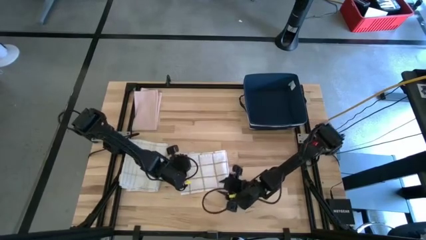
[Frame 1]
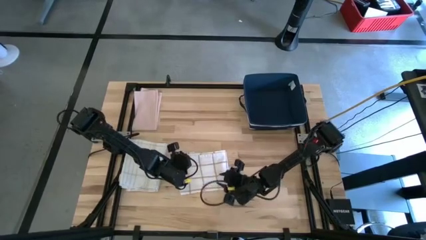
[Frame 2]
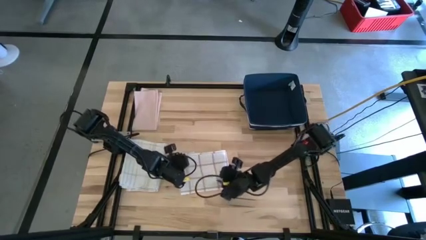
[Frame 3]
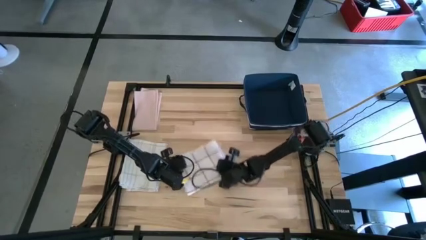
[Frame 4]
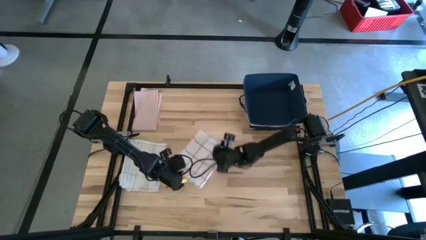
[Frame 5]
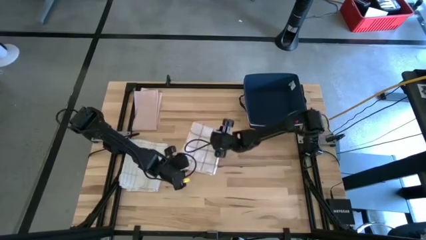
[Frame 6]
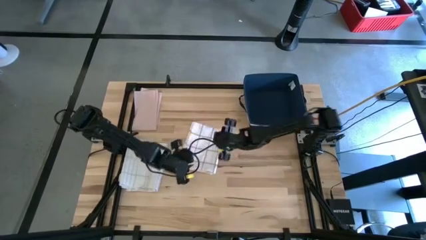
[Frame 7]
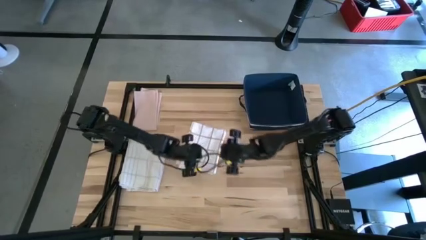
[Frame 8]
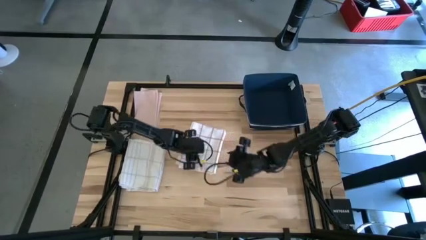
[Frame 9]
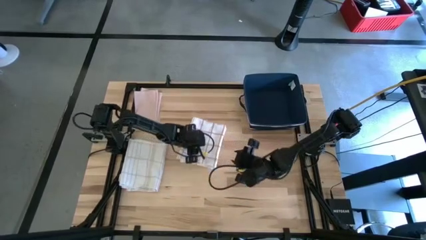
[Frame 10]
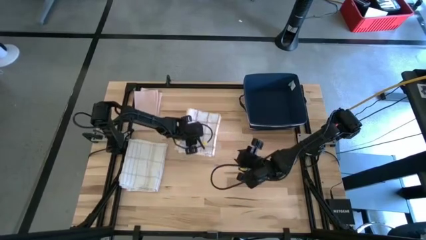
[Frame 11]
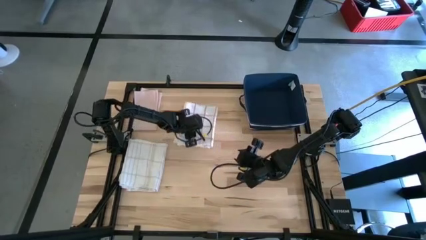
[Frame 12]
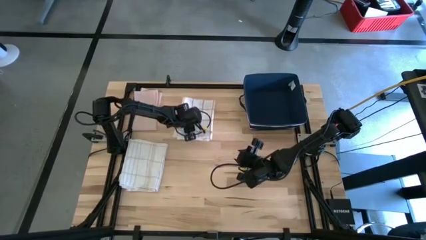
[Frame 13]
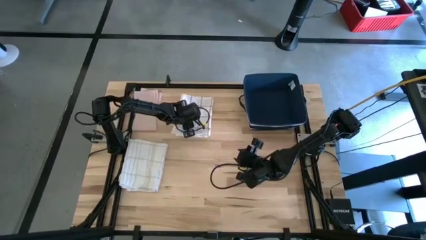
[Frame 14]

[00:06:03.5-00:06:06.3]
Task: Fold towel
Move the white squared towel to the top

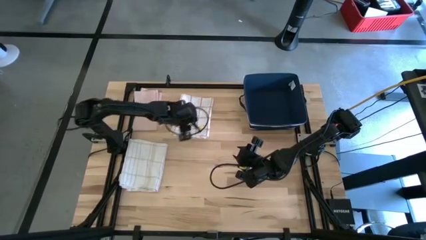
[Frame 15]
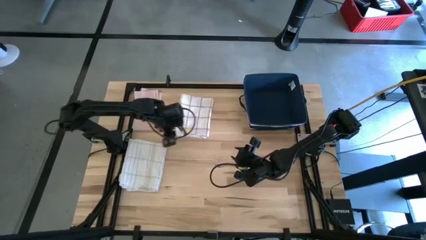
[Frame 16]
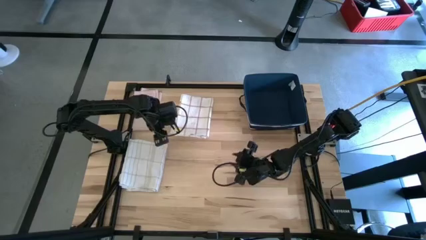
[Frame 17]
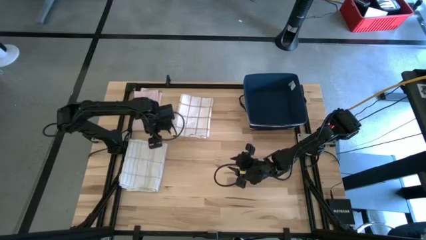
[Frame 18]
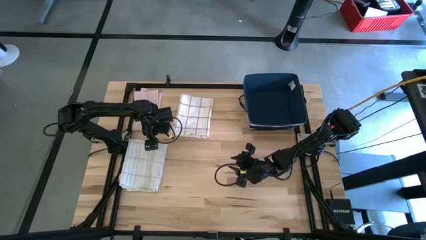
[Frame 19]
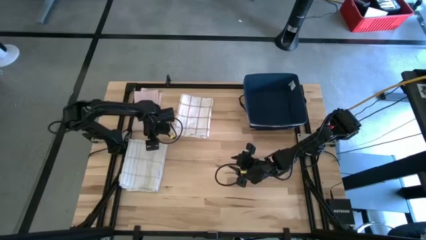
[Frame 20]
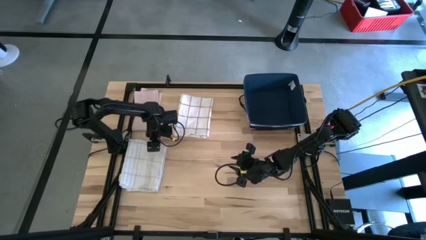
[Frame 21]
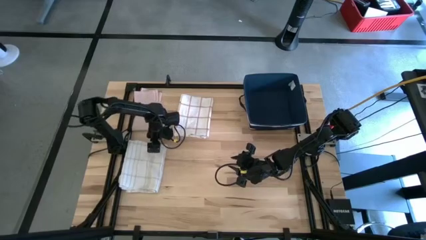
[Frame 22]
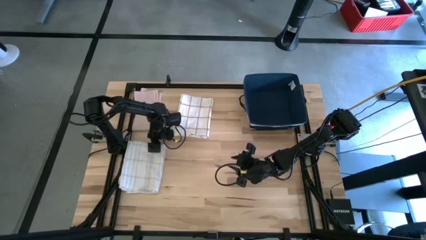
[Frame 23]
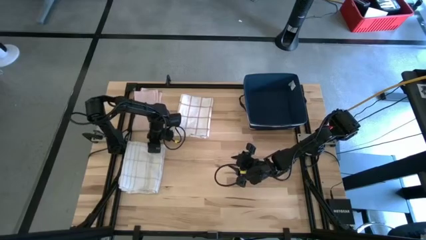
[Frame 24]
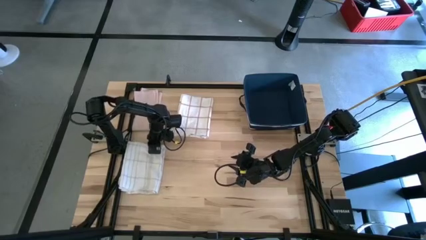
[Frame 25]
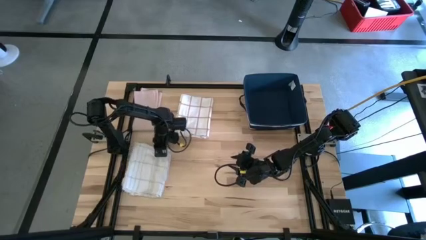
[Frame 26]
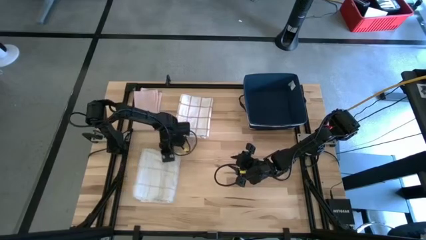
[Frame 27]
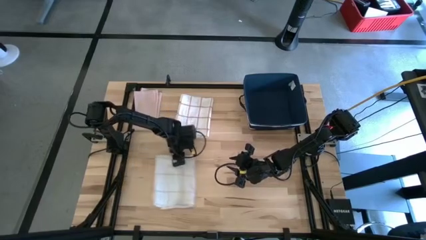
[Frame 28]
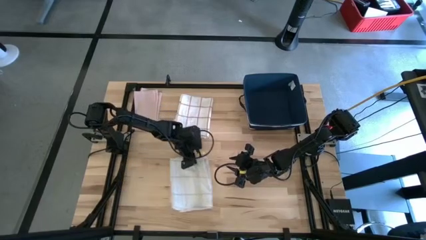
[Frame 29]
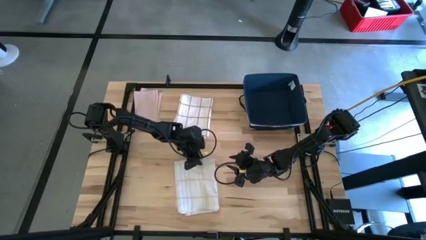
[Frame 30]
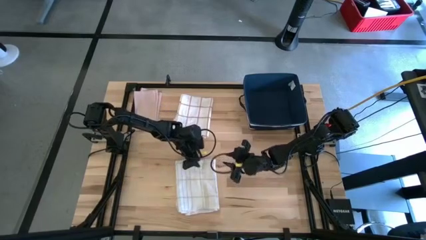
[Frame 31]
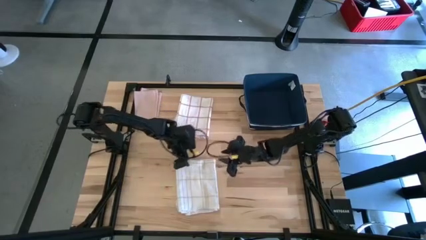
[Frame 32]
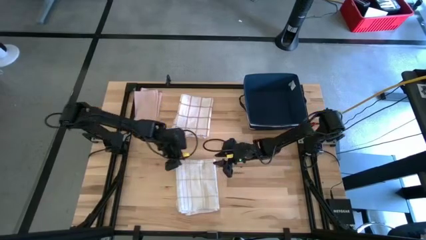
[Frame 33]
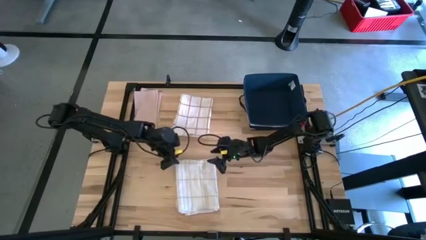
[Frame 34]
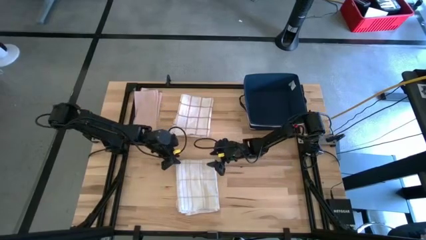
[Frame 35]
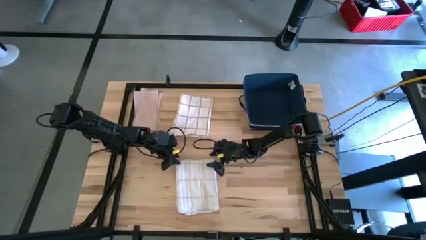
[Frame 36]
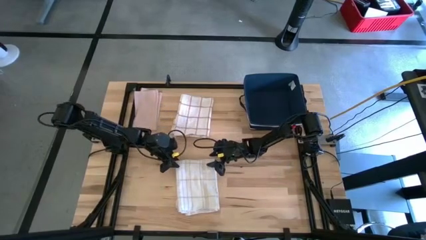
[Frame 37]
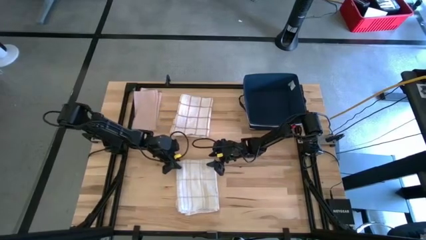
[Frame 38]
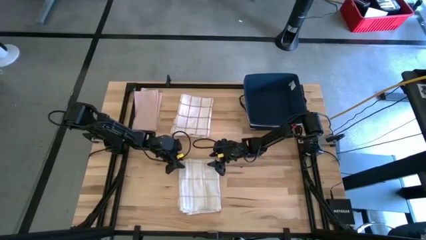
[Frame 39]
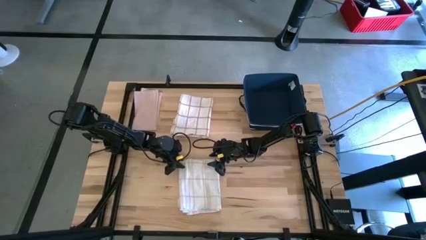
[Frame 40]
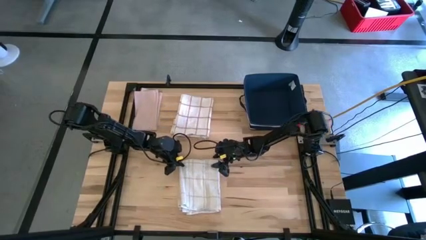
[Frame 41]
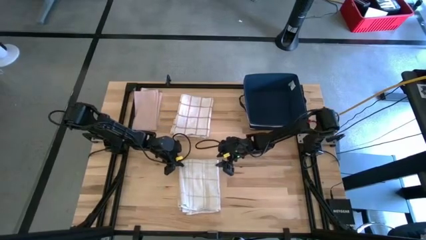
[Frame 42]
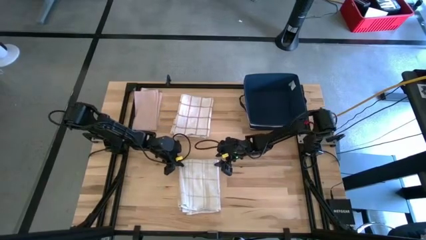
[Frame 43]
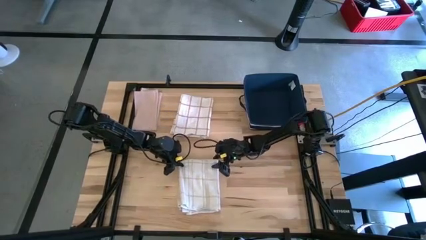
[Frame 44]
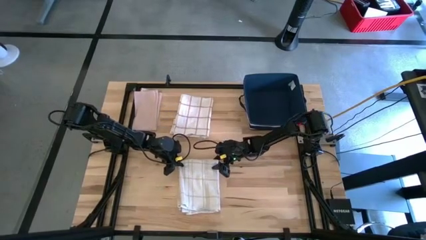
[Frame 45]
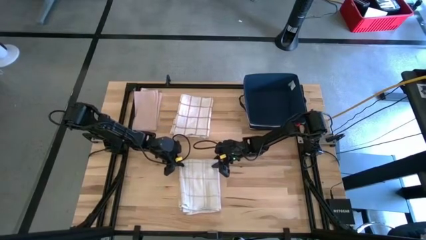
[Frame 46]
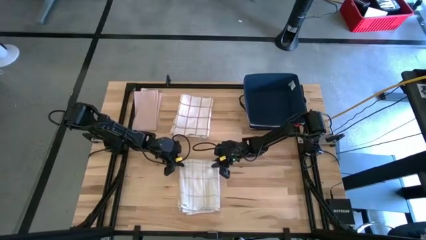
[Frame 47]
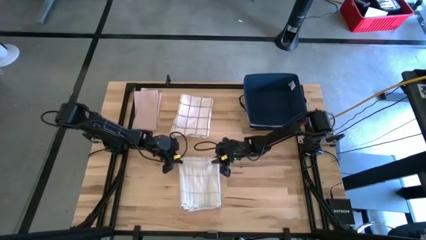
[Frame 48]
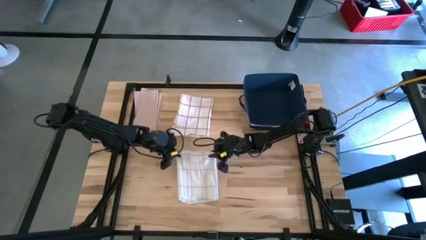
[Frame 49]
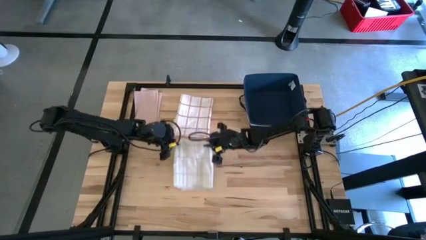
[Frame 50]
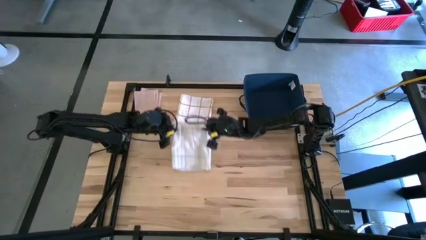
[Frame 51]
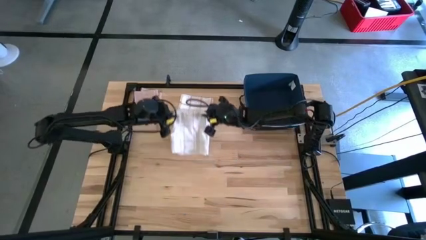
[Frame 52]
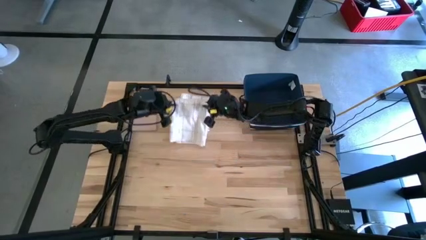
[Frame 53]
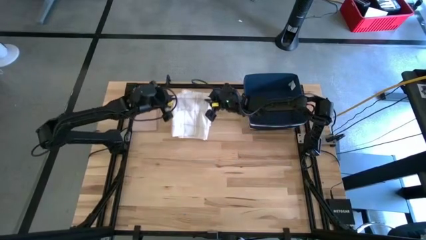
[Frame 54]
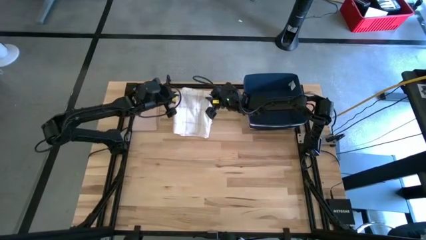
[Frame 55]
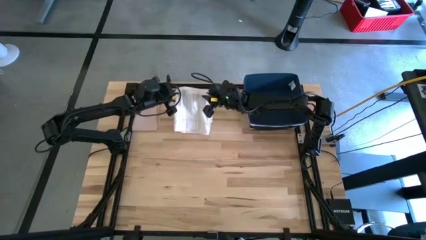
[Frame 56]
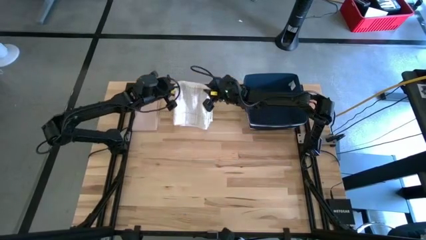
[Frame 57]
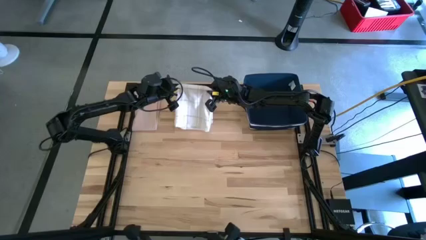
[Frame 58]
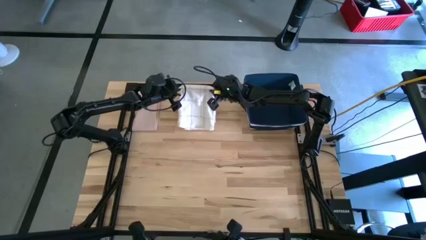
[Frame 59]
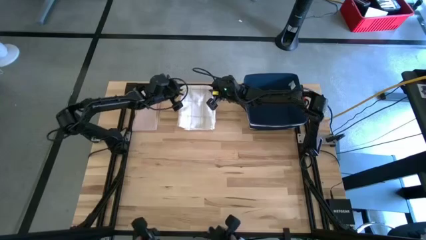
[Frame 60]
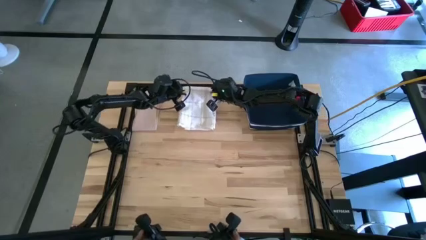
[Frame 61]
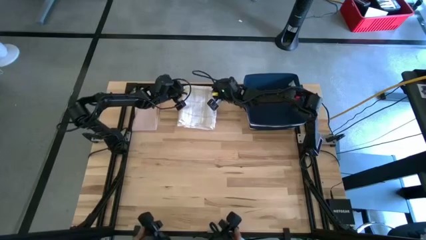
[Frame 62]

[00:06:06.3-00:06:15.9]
Stack the white patterned towel on top of the white squared towel

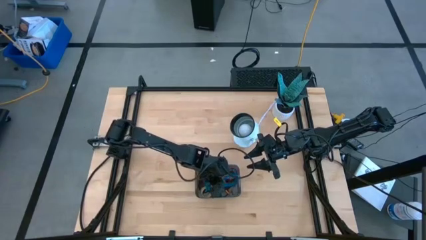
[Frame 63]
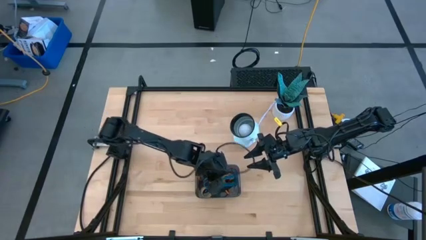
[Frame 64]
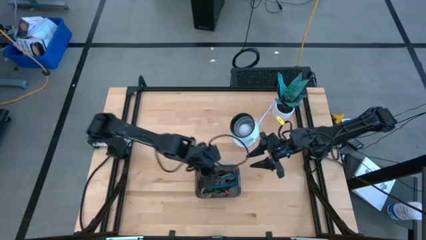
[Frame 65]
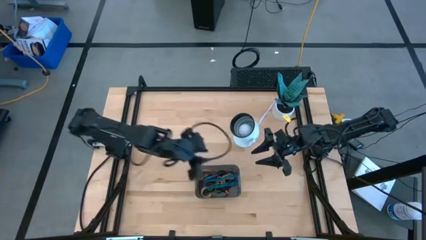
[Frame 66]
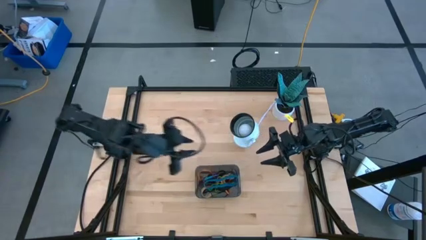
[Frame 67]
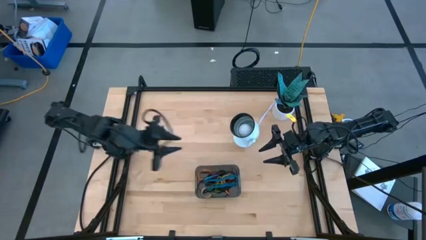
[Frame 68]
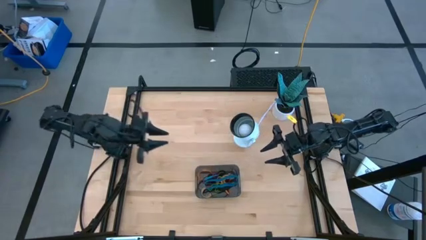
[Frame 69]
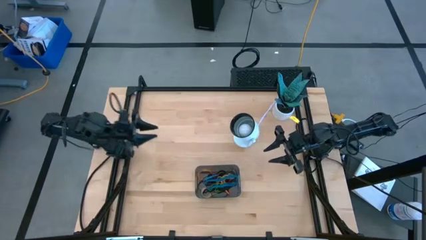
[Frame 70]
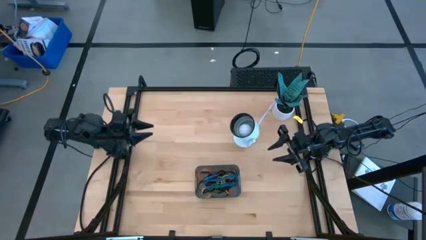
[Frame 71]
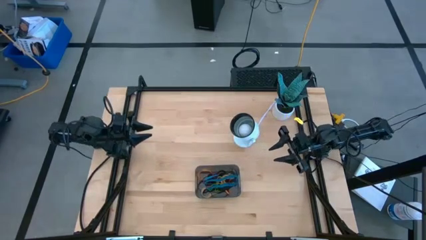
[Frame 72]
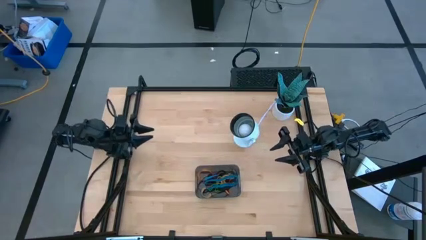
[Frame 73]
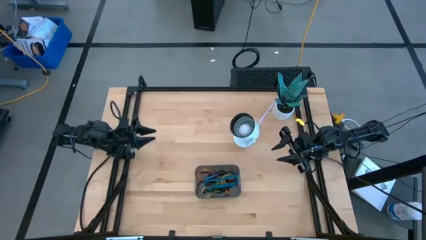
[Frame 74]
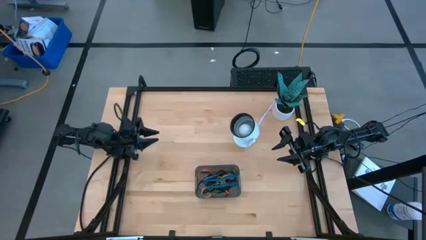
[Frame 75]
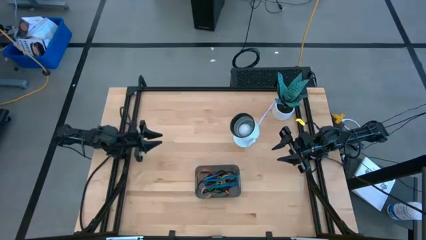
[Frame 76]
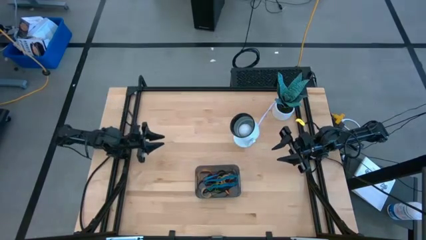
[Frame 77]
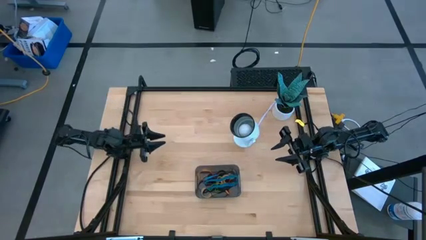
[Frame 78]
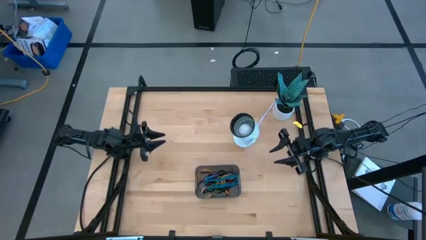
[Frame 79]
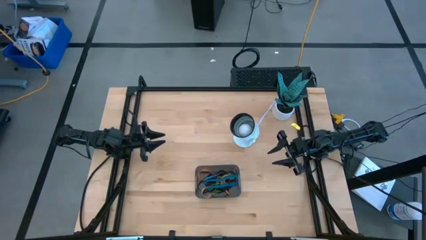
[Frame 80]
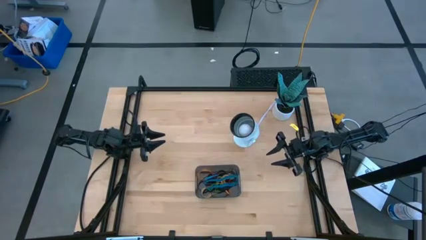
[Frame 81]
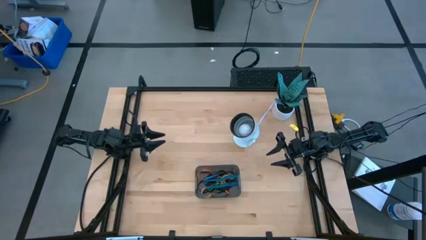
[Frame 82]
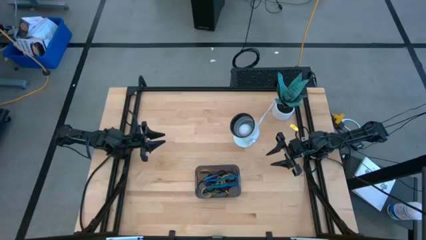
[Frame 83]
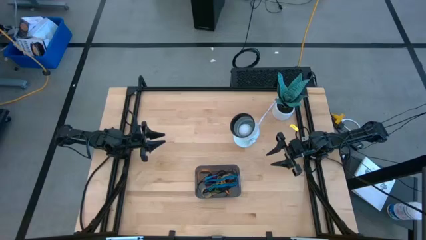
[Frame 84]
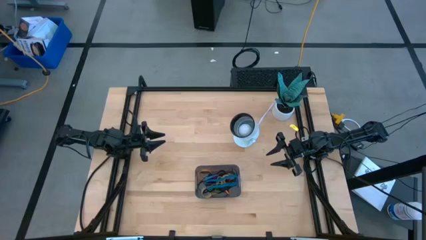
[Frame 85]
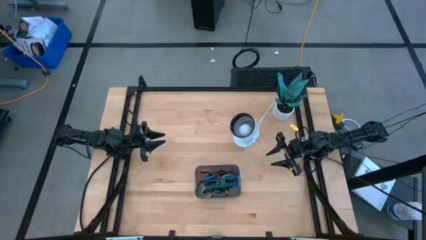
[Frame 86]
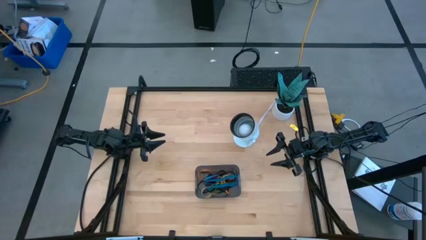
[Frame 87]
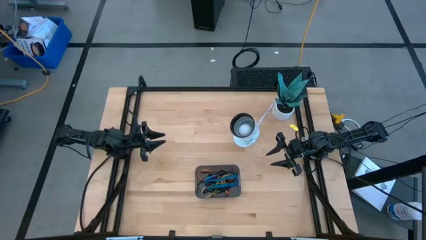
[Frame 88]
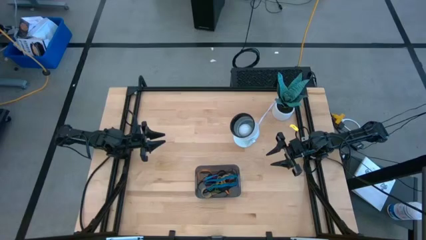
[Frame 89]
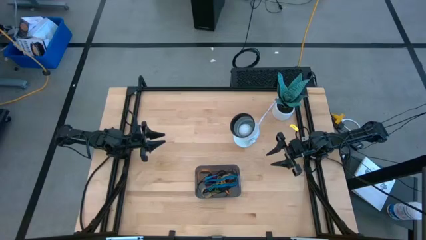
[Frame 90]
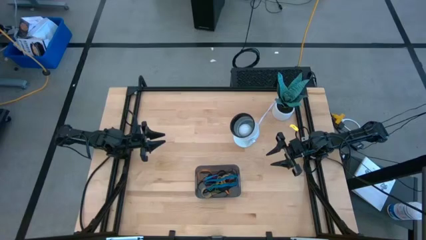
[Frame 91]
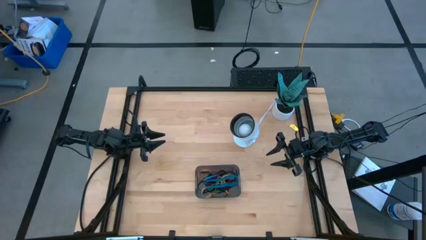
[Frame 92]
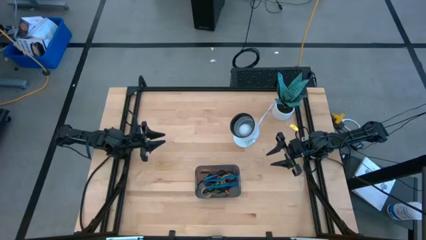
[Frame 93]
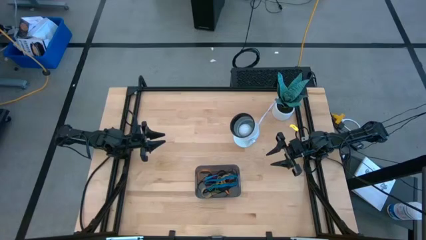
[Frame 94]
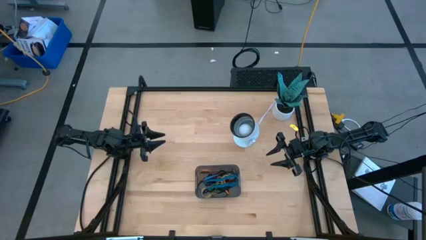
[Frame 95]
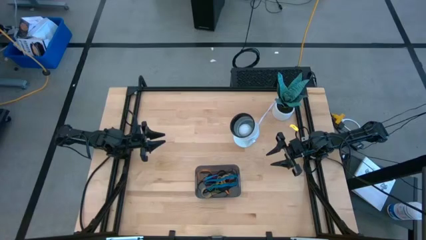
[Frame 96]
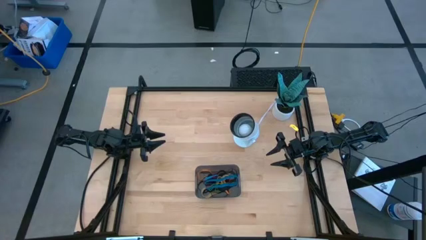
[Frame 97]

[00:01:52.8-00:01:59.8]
Task: Pick and place rubber bands into bin
Return to Home Position
